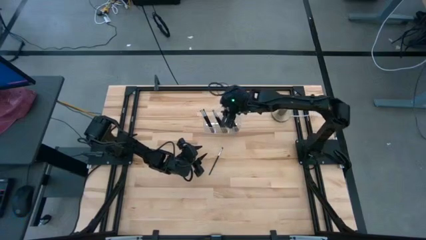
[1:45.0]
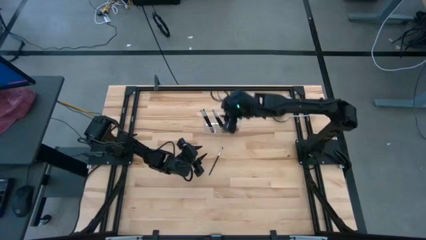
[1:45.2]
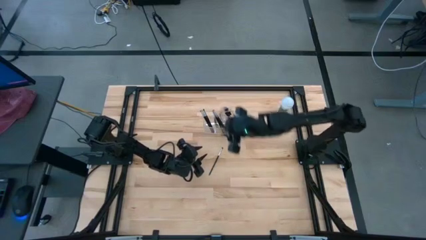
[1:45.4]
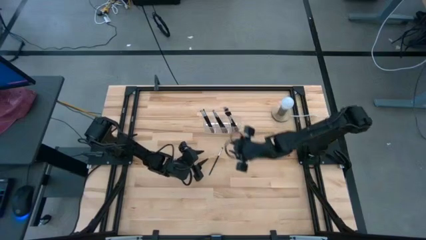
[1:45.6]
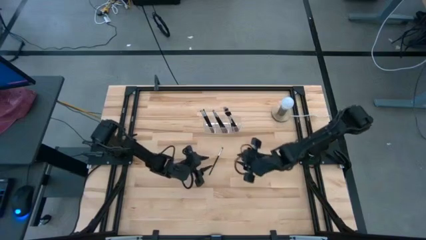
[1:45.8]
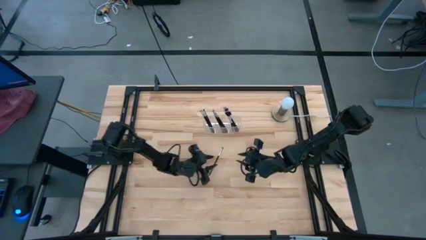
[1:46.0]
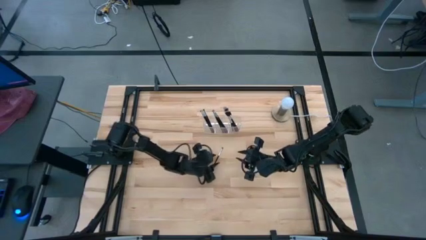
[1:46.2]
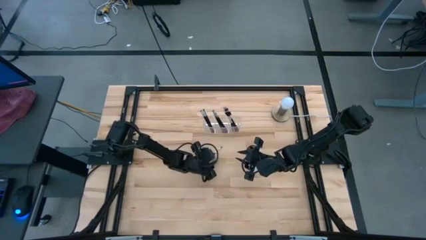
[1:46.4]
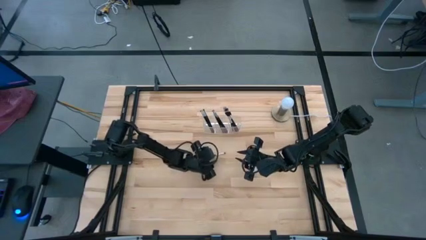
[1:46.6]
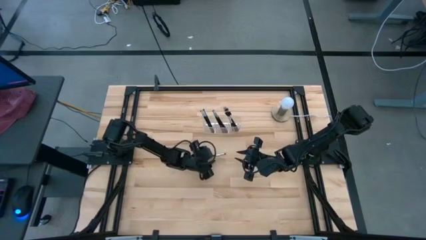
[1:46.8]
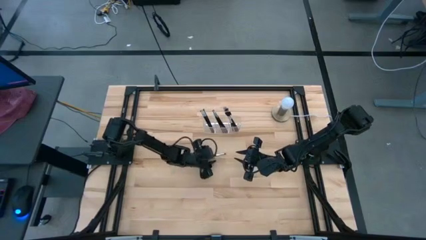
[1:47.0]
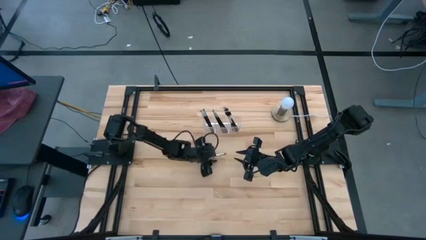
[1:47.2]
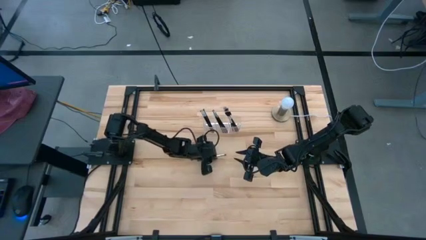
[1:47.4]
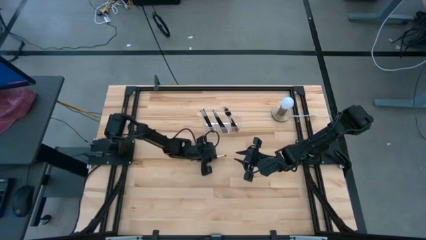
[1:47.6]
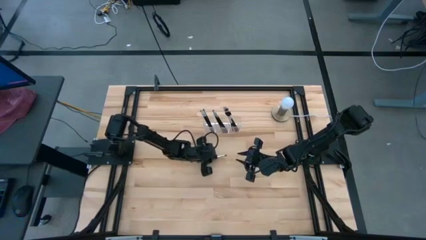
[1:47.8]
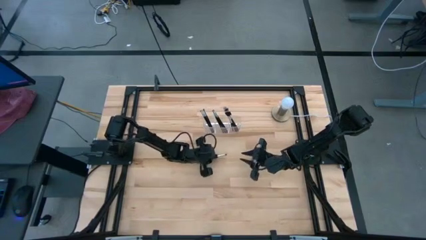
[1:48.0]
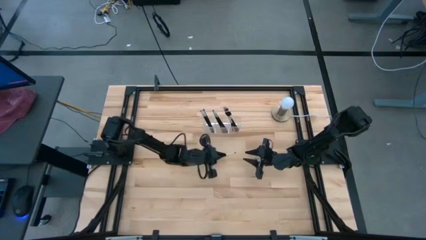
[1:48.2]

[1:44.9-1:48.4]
Task: Put items in baskets/containers
Put the black eyeshadow brush into the transparent organizer

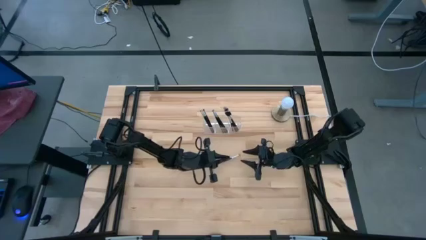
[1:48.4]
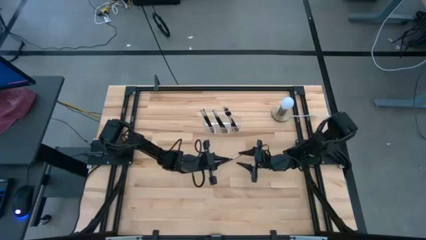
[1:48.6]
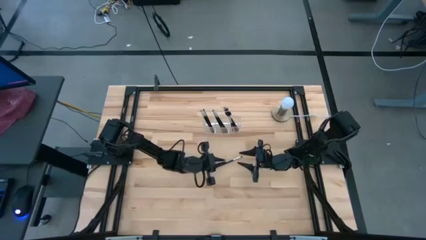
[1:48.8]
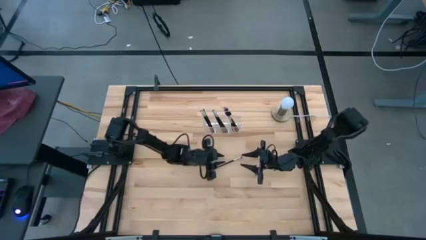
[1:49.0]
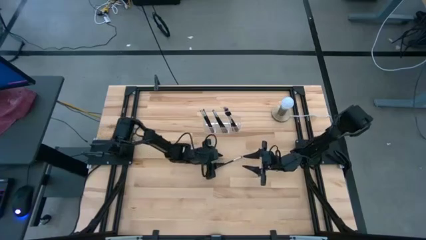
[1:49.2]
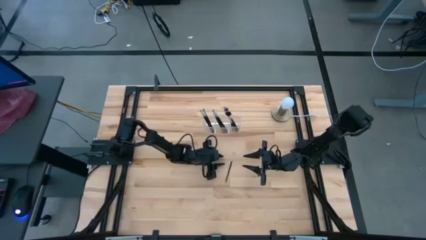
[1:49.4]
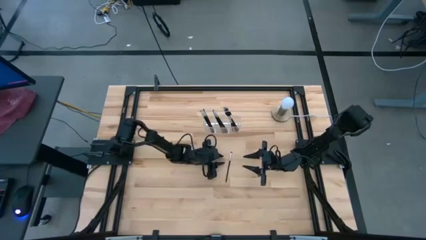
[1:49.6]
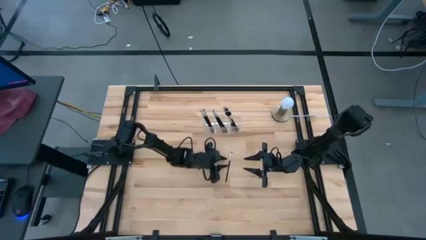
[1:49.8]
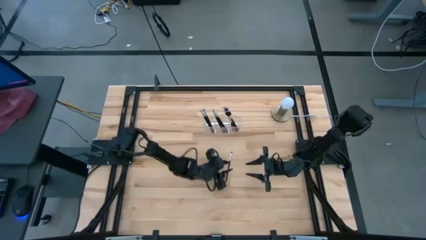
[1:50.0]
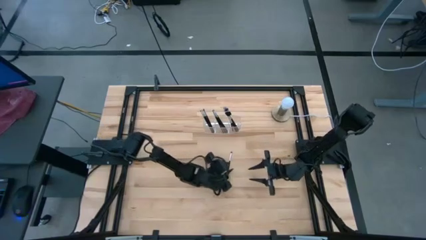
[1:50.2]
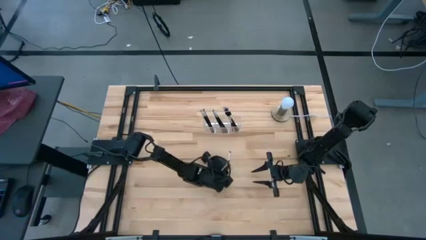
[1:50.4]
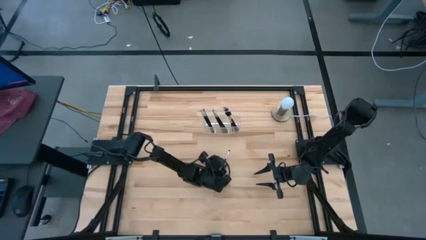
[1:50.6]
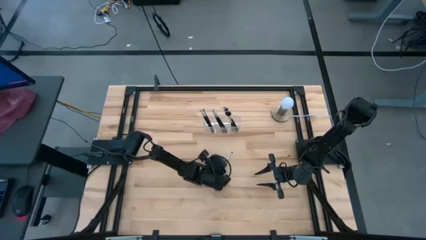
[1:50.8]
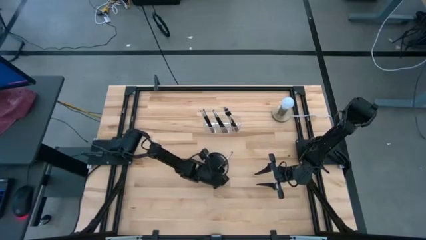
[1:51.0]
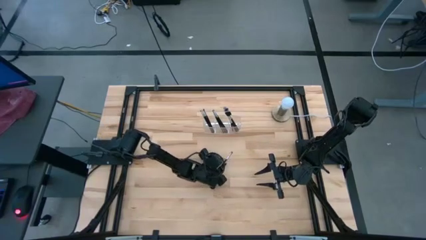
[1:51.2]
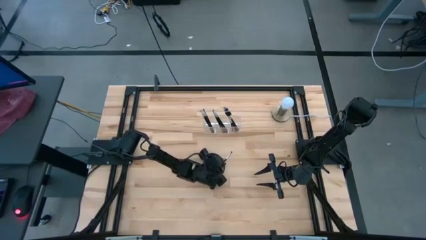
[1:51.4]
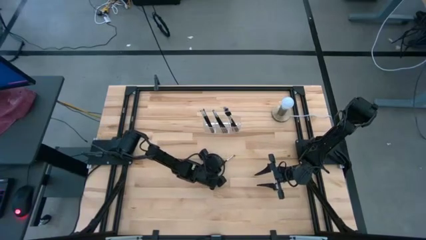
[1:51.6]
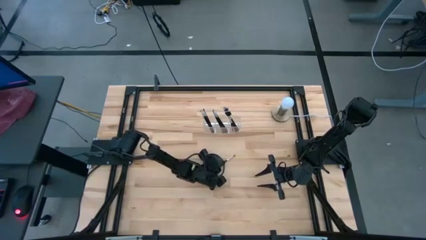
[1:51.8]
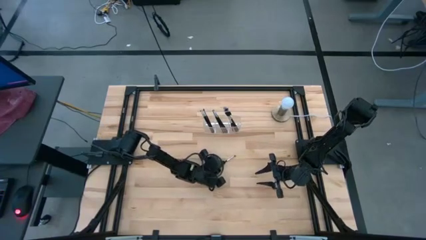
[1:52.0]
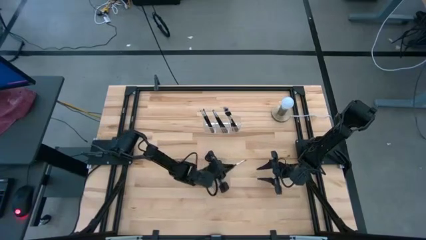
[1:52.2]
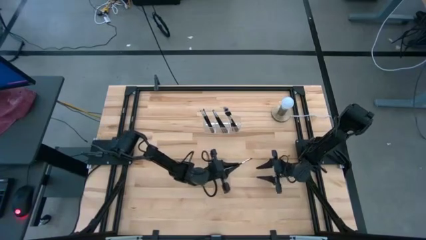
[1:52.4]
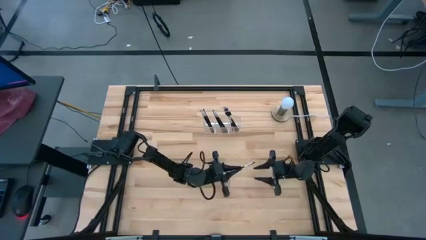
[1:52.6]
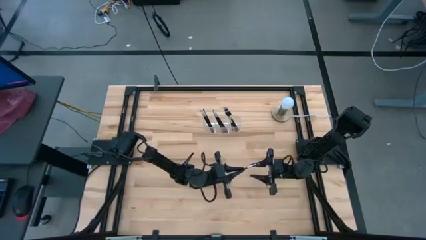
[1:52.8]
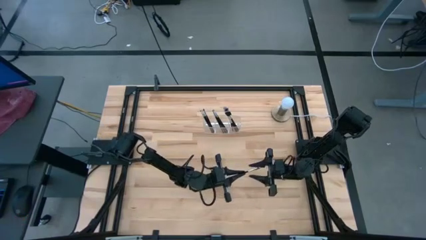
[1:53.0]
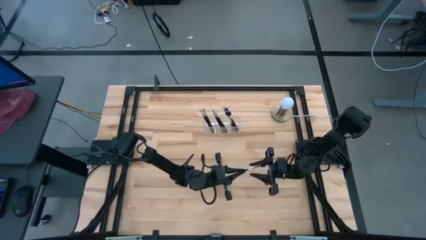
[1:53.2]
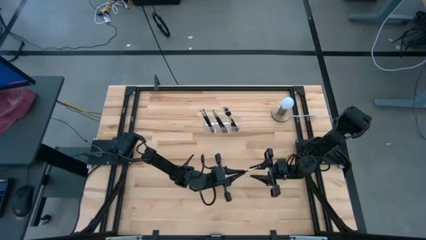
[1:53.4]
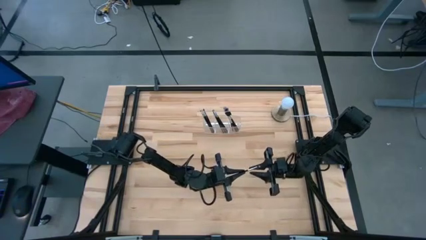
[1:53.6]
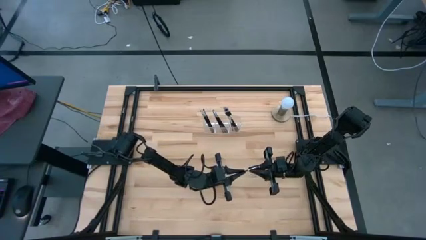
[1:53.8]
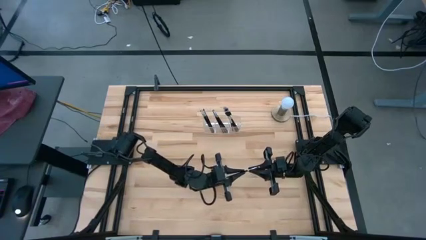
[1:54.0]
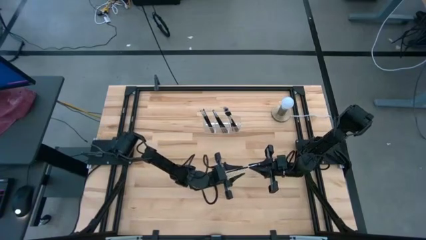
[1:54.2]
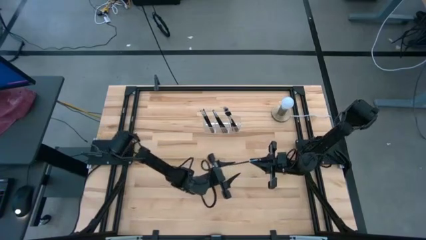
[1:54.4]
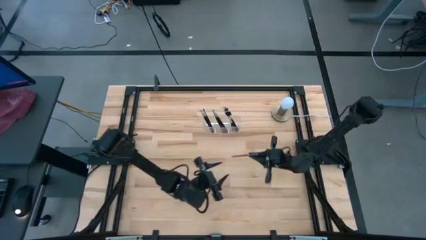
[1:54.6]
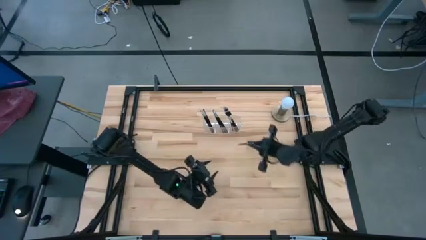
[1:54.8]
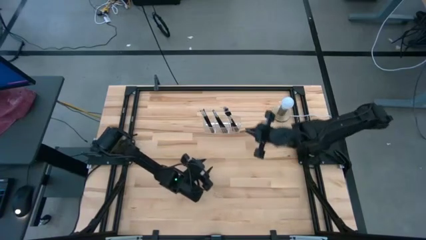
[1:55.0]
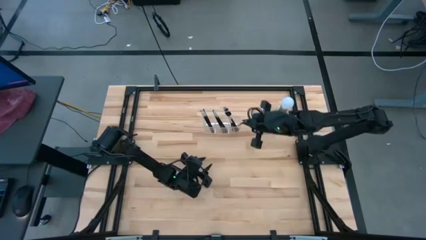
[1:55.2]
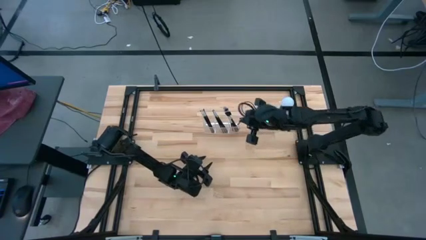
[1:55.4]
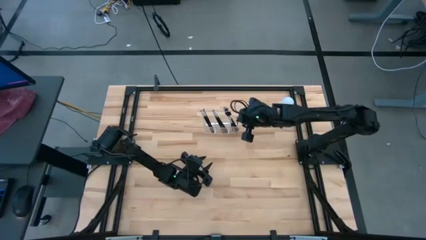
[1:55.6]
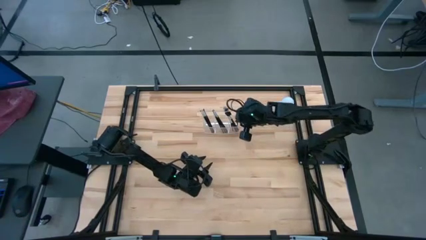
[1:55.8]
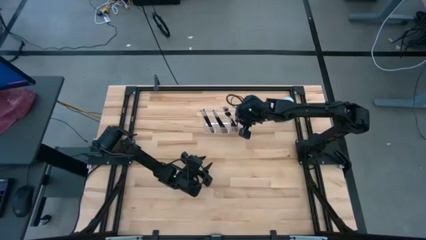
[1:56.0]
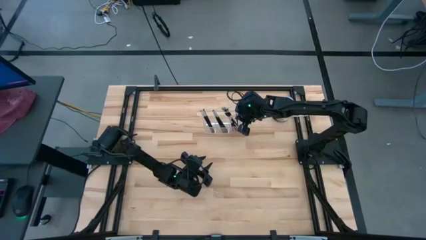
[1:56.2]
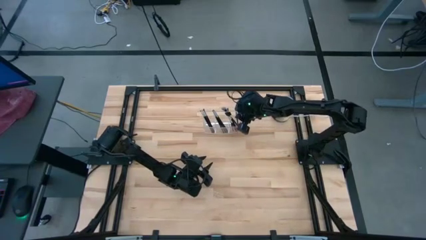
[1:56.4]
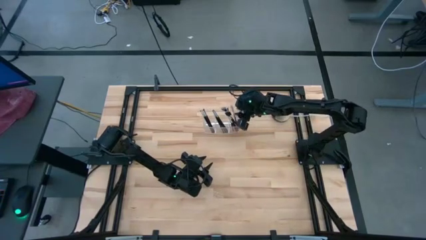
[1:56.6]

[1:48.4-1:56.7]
Put the black eyeshadow brush into the transparent organizer

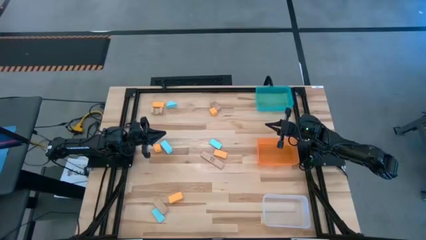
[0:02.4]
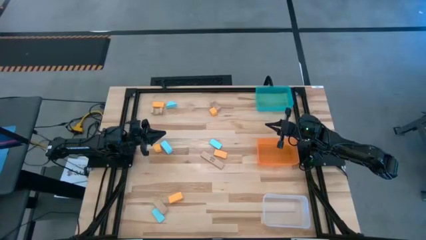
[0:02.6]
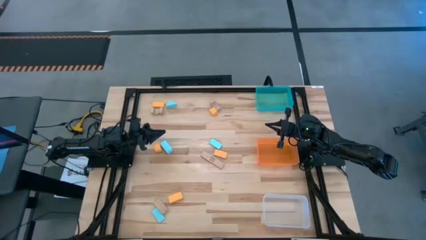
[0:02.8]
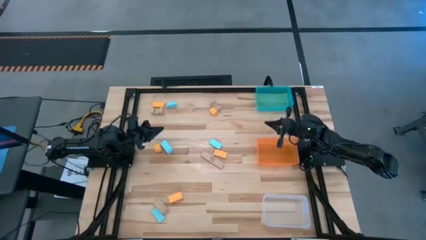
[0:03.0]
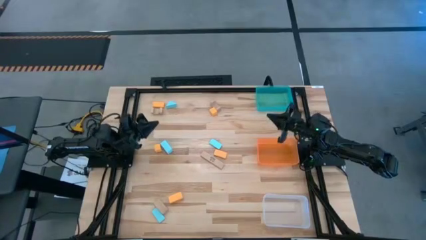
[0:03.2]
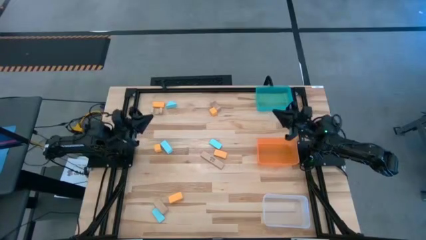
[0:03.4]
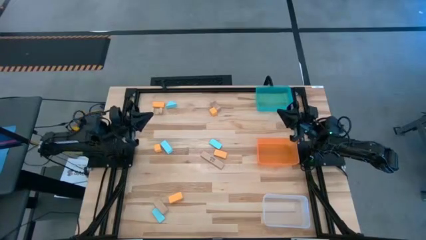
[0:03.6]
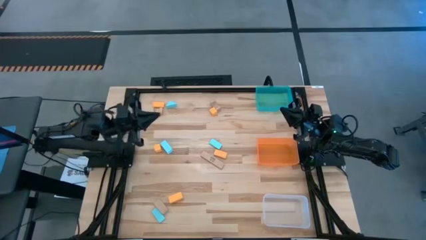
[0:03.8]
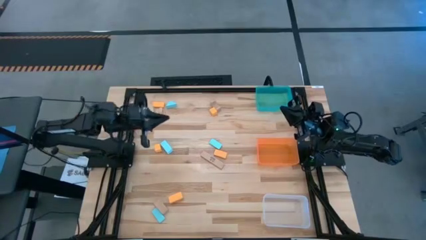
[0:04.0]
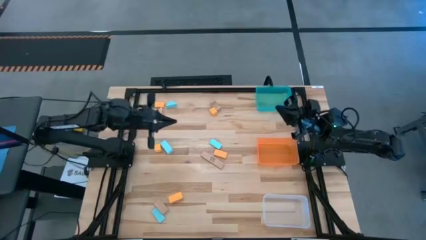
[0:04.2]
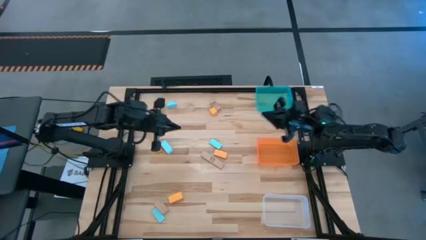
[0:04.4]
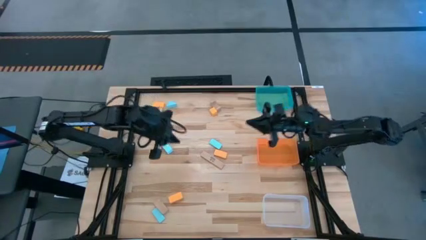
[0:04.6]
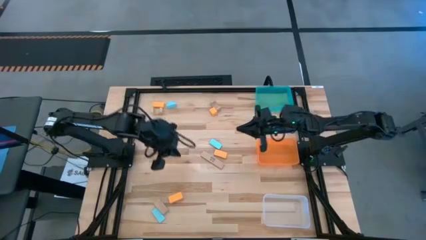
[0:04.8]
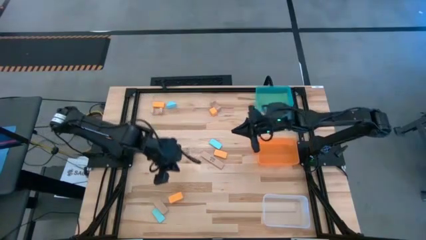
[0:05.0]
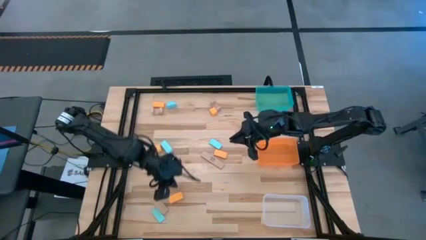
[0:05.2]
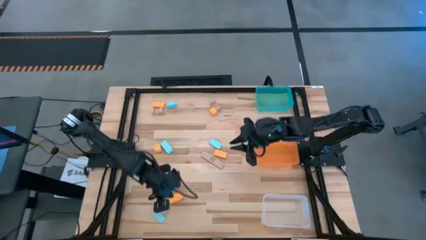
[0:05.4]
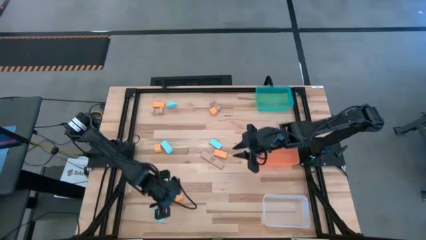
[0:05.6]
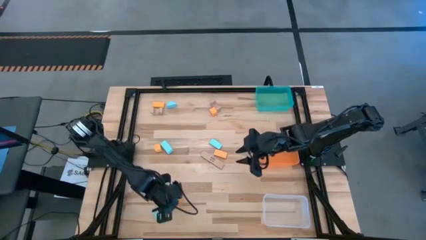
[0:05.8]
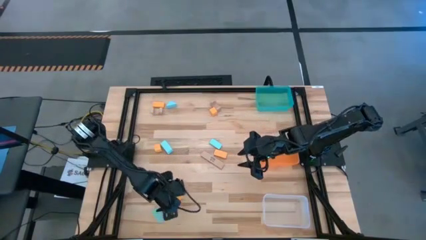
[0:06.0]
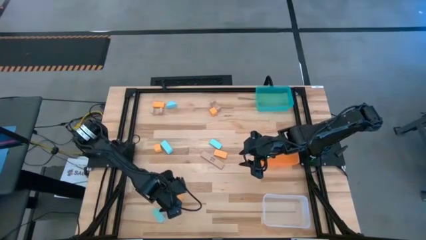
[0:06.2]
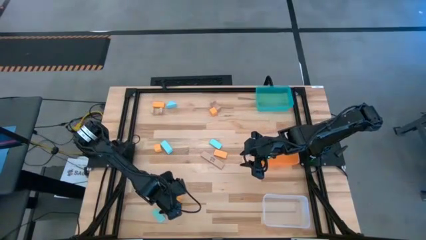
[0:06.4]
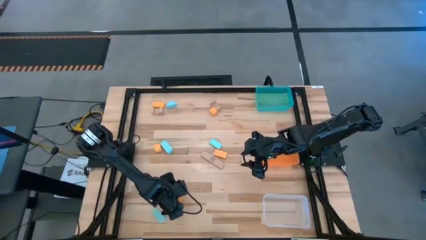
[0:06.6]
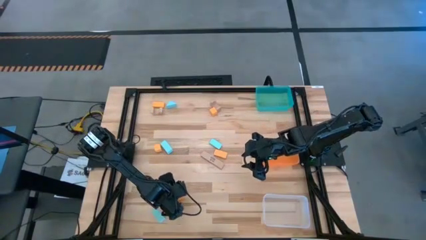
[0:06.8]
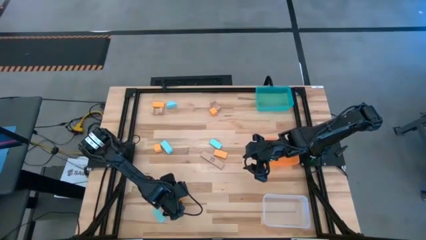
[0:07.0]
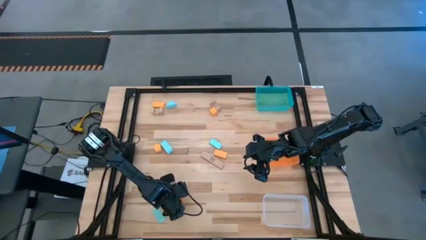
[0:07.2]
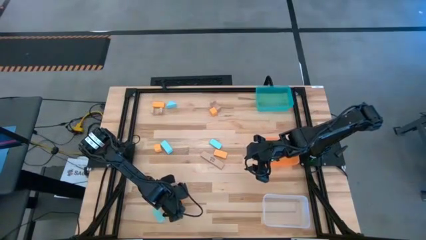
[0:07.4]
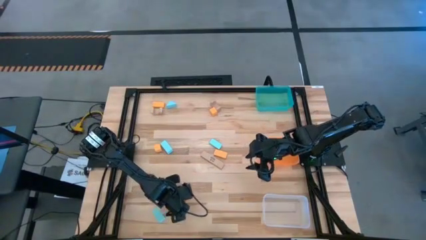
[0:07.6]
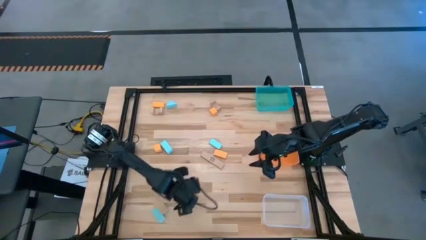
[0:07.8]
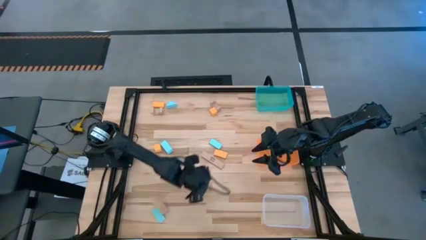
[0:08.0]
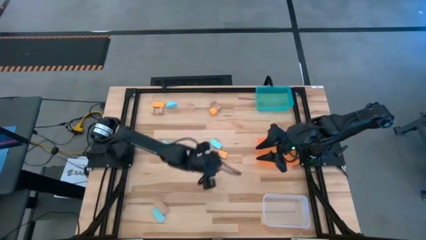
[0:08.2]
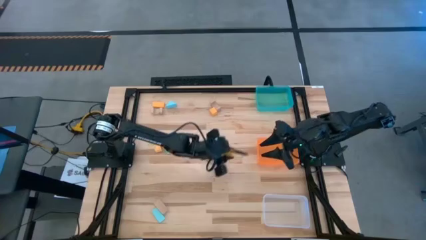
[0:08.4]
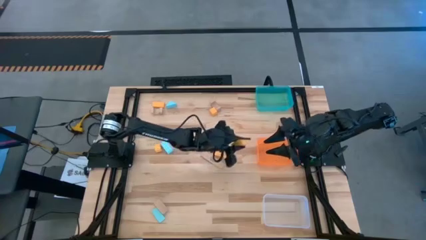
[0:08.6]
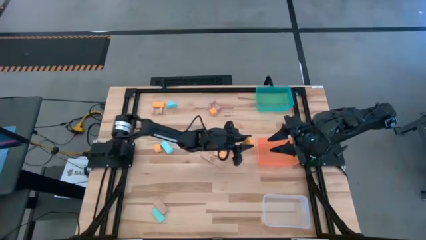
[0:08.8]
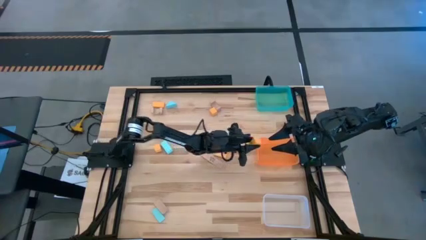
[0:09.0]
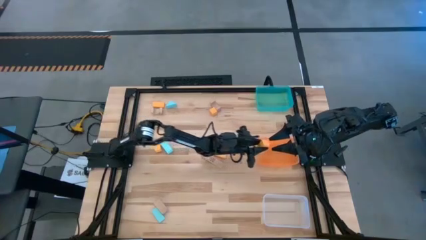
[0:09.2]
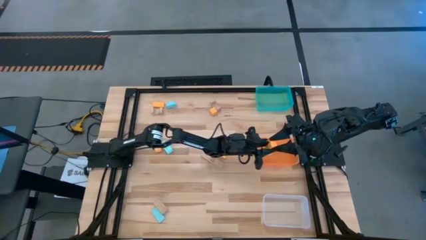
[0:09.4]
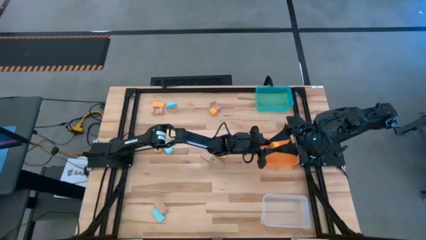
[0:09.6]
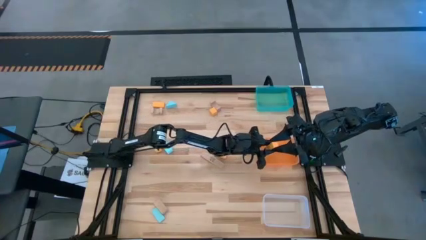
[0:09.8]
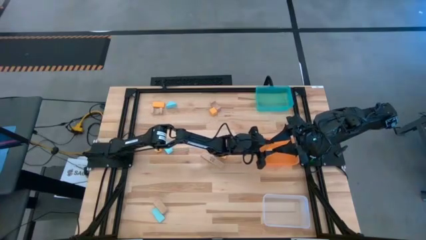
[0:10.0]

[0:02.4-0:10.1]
Task: Sort & place blocks by color
Put the orange block into the orange bin
